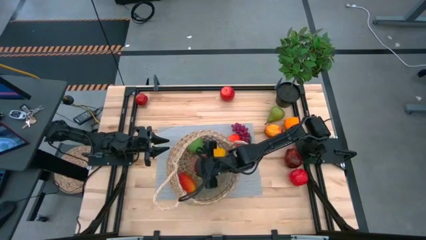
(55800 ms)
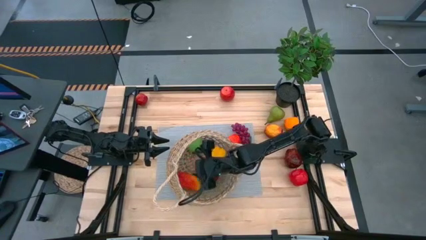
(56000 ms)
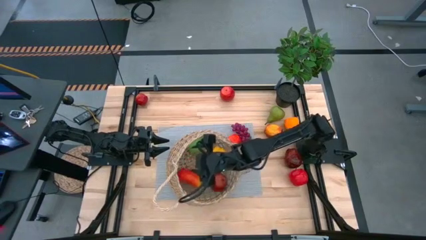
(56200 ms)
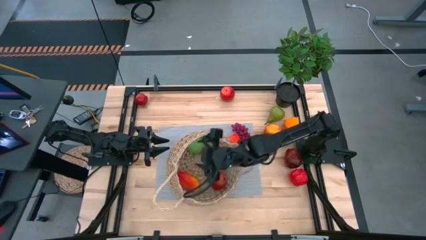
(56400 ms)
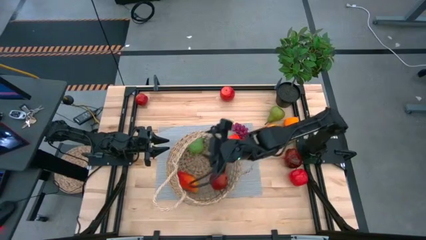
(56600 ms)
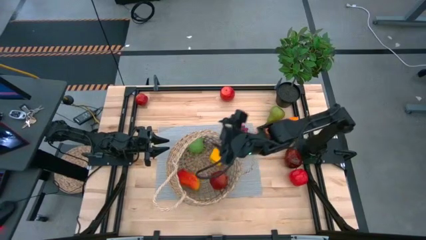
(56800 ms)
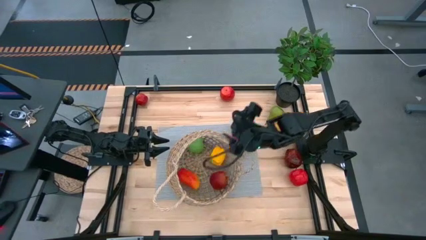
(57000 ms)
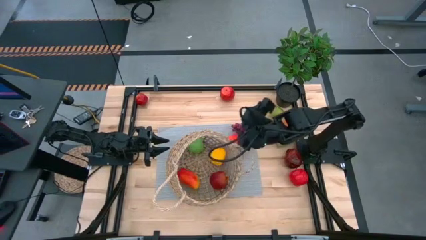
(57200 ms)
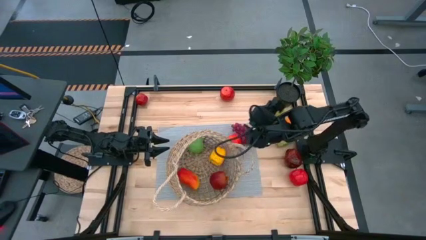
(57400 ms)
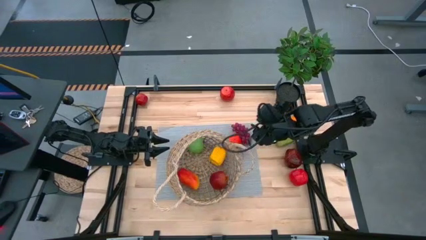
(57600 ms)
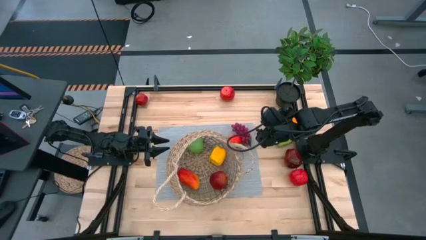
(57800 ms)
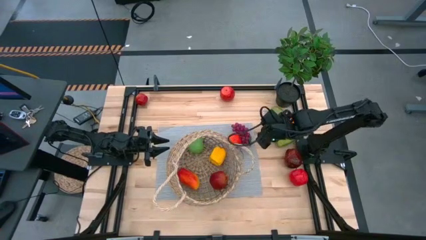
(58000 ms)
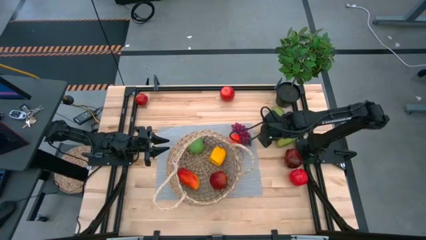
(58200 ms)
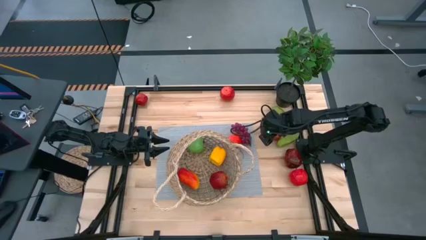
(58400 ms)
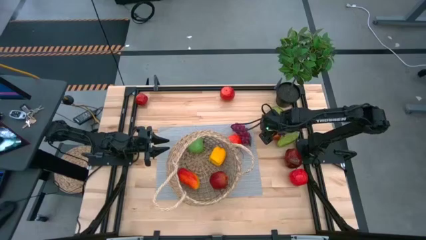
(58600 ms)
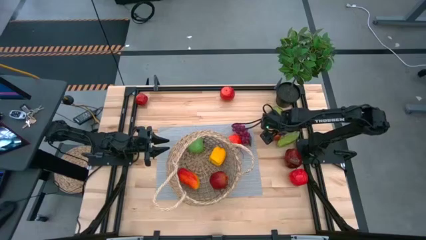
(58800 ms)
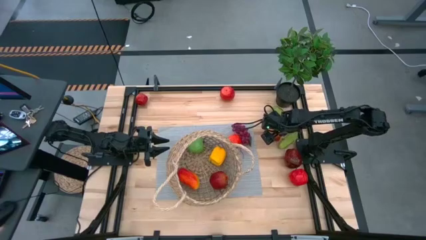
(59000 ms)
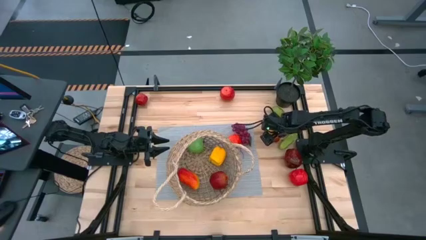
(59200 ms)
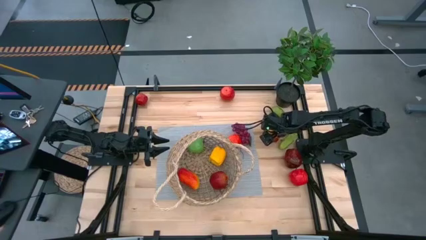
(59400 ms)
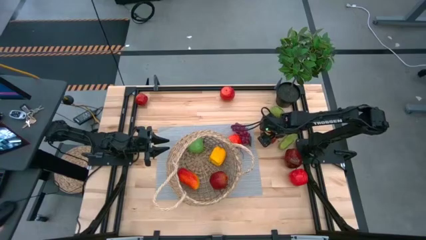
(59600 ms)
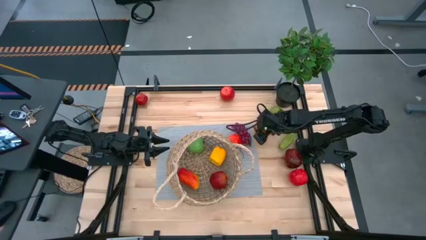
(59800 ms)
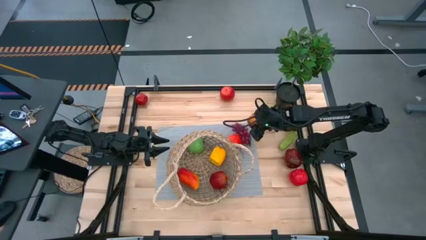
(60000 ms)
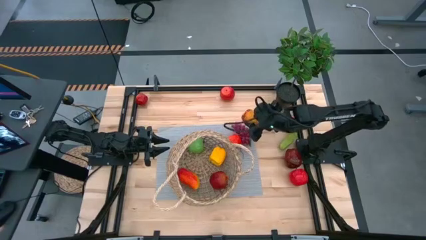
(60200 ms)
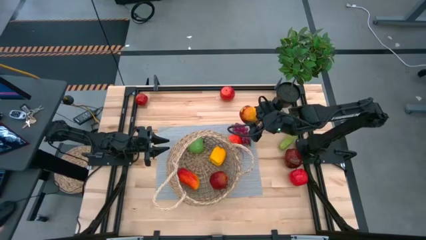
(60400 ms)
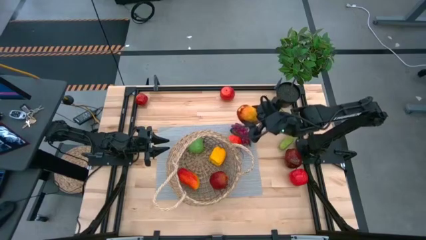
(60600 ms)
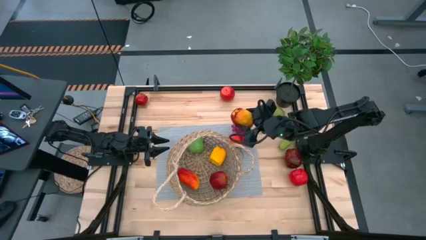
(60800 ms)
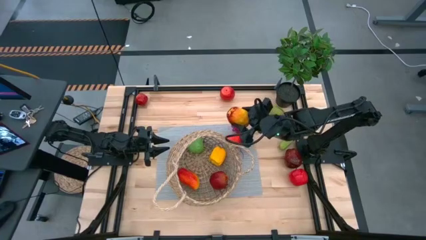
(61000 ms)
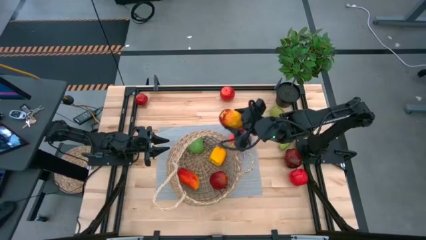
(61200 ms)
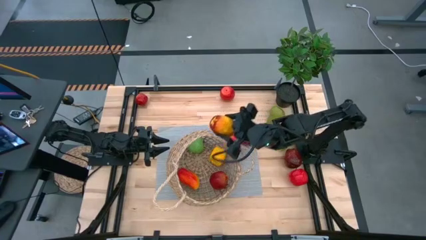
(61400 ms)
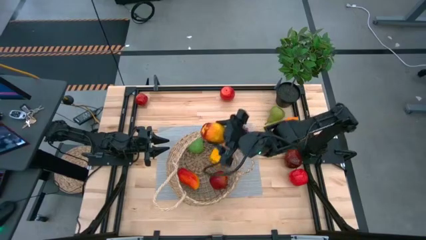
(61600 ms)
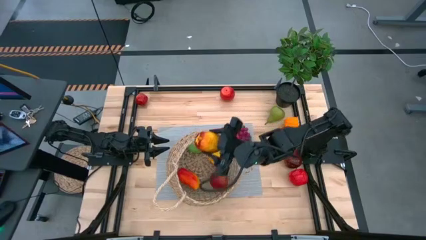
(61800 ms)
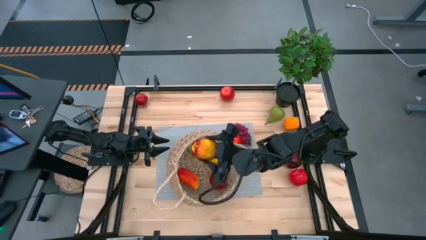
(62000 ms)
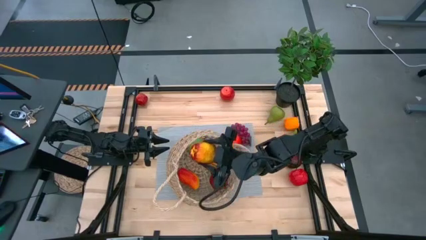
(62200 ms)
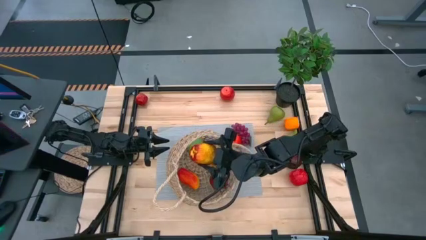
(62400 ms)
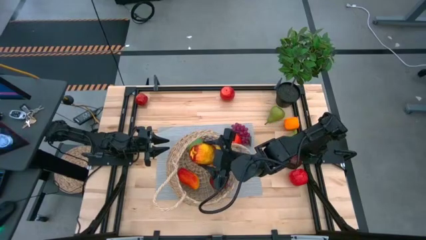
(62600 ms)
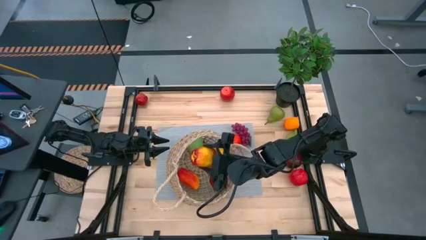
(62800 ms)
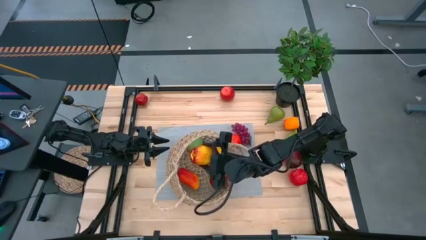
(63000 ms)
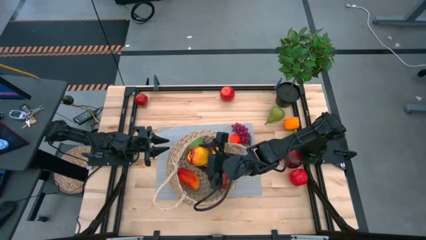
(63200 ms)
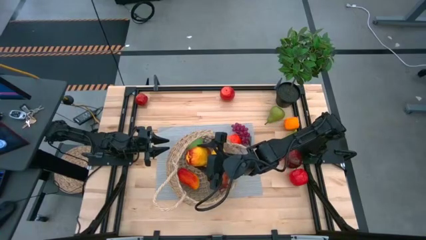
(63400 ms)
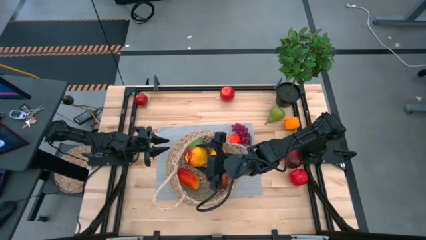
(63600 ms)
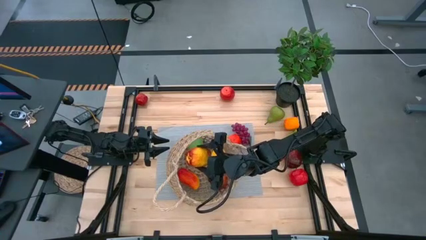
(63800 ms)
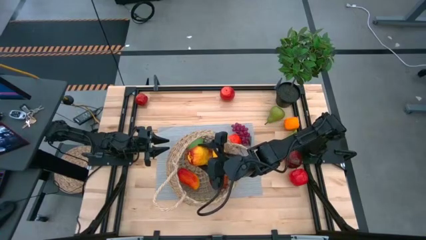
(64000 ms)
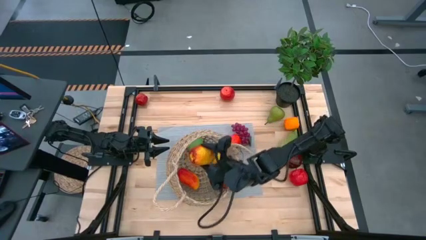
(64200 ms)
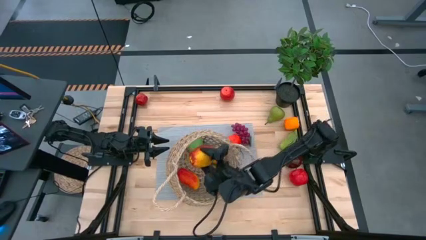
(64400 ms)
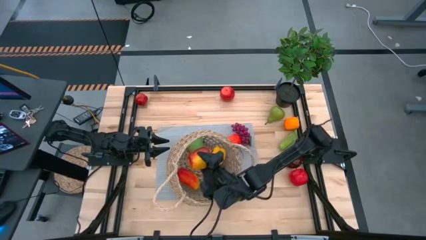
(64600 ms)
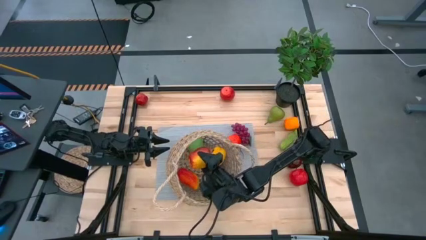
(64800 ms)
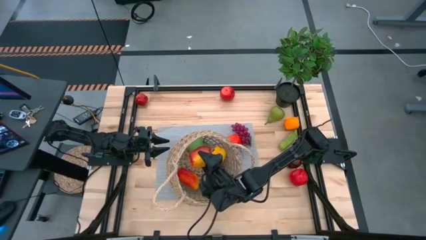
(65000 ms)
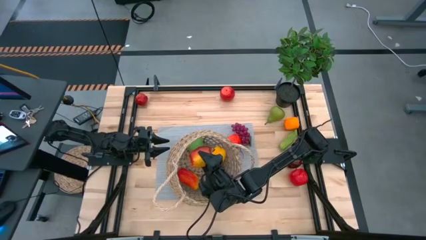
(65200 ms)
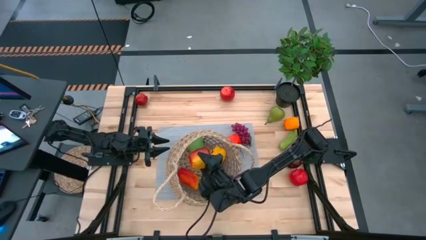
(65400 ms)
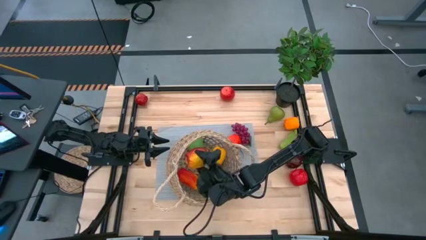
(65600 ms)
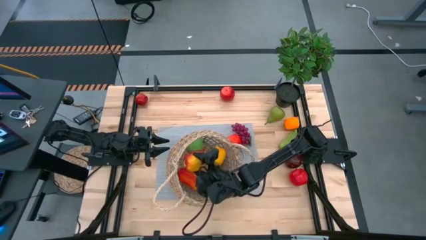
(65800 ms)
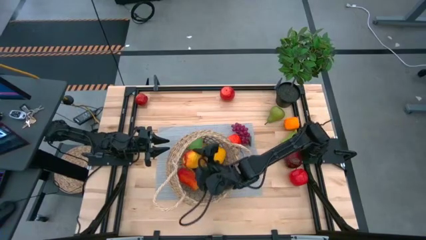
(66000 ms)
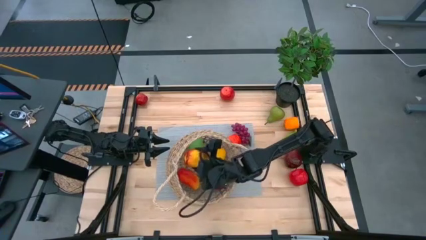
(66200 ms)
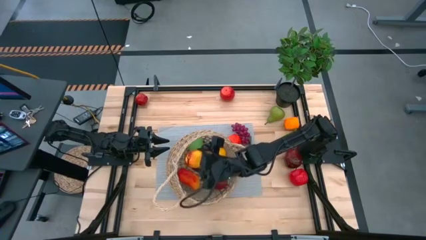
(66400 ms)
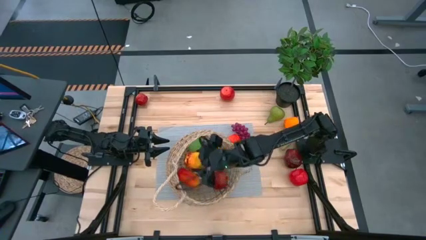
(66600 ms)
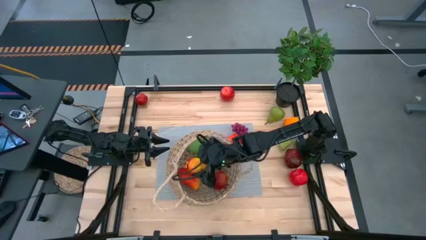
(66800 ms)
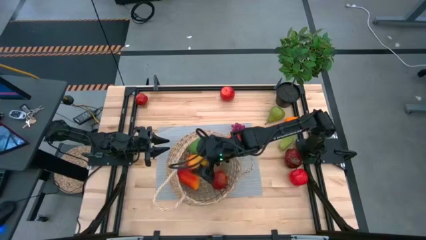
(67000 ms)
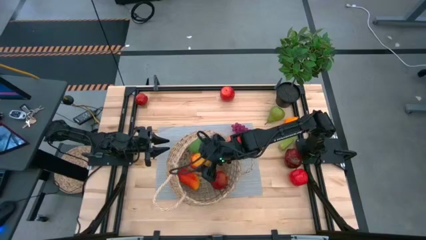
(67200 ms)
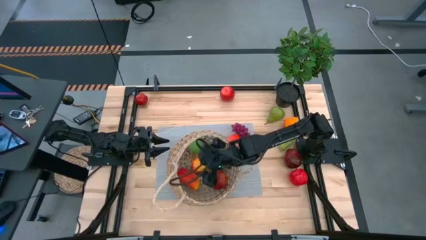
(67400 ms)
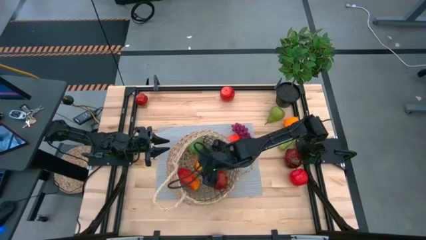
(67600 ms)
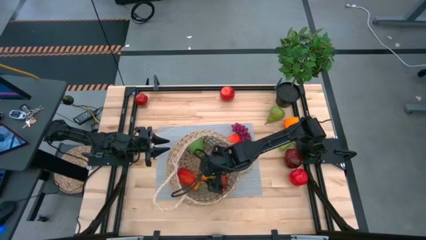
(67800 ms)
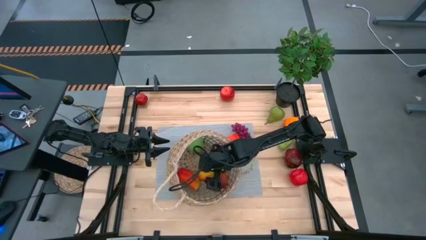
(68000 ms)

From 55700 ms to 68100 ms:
Task: Build produce basket
Put the red apple into the brown basket

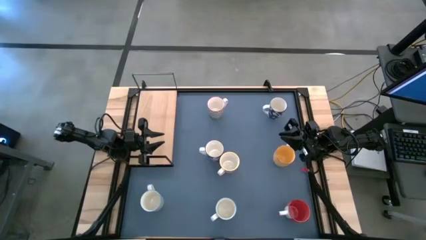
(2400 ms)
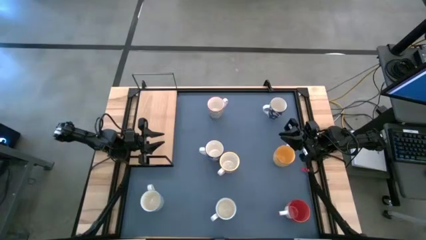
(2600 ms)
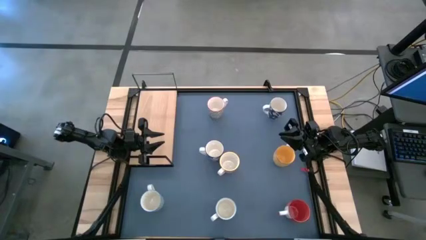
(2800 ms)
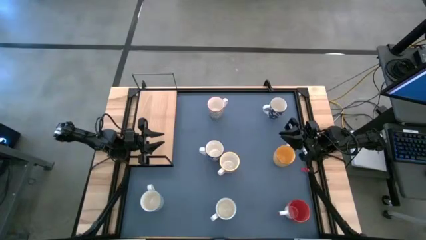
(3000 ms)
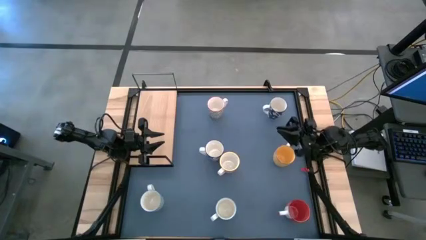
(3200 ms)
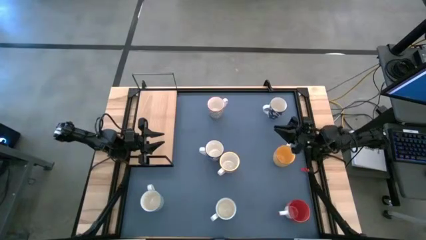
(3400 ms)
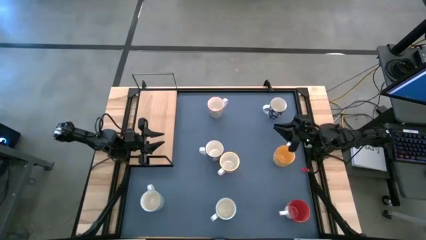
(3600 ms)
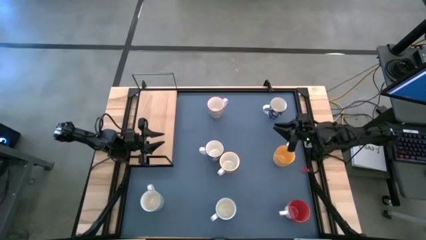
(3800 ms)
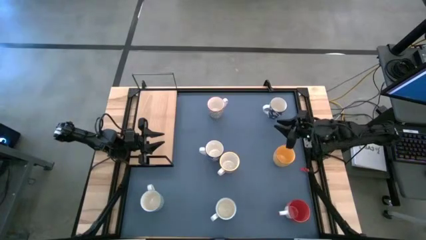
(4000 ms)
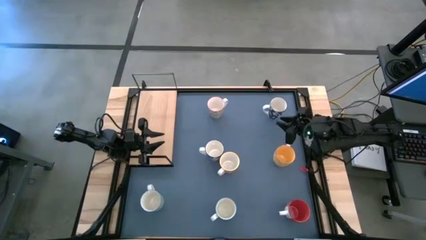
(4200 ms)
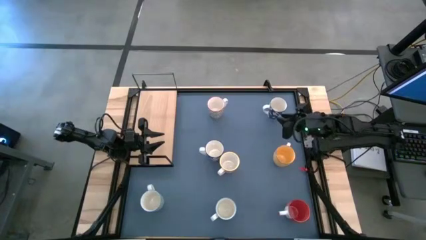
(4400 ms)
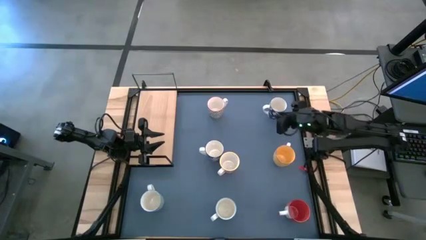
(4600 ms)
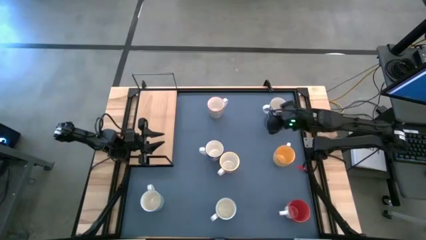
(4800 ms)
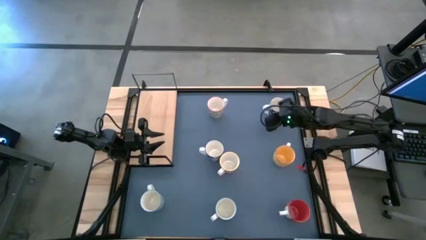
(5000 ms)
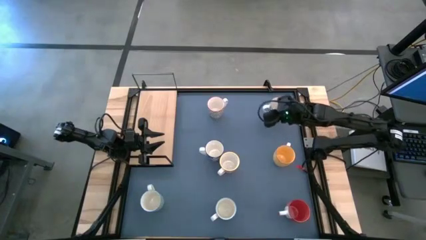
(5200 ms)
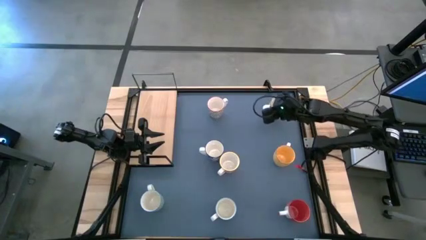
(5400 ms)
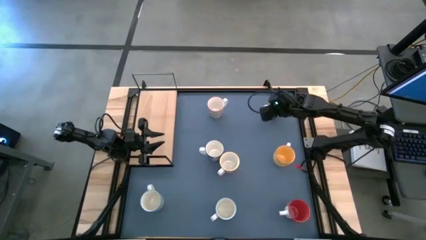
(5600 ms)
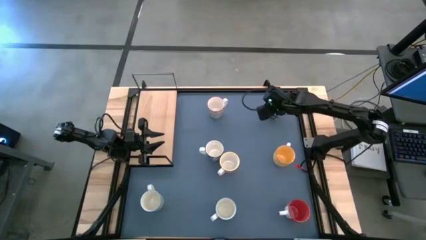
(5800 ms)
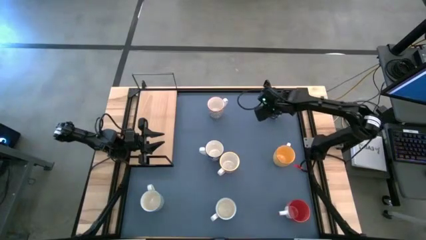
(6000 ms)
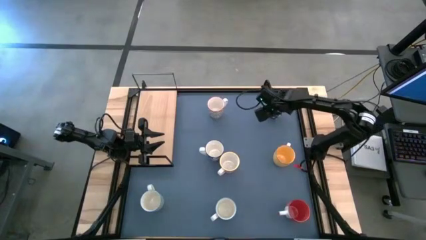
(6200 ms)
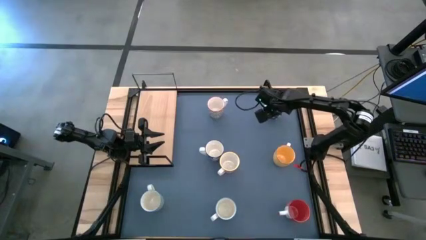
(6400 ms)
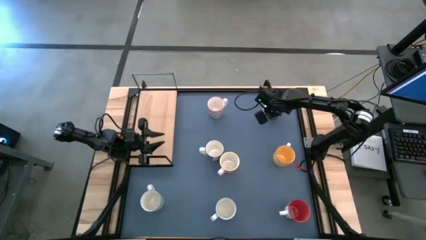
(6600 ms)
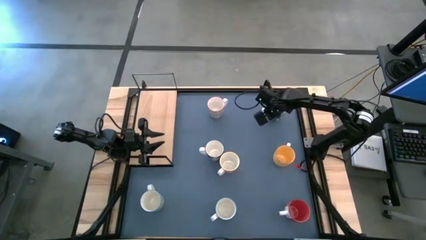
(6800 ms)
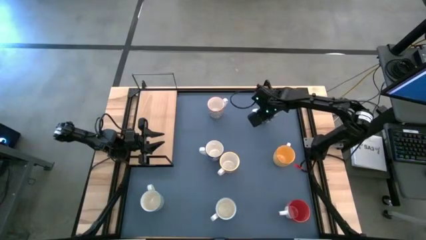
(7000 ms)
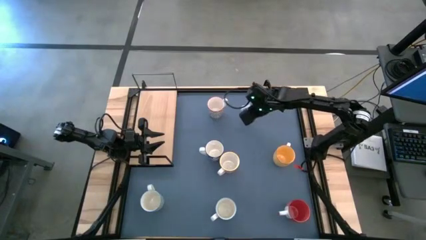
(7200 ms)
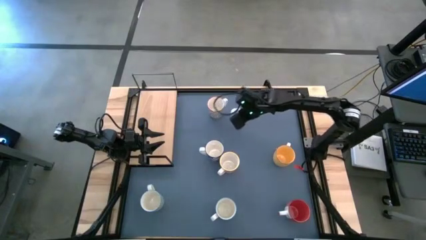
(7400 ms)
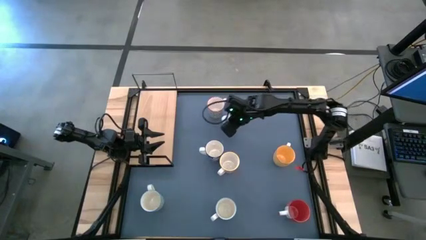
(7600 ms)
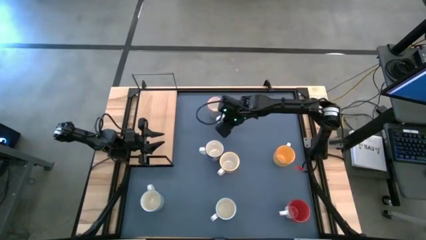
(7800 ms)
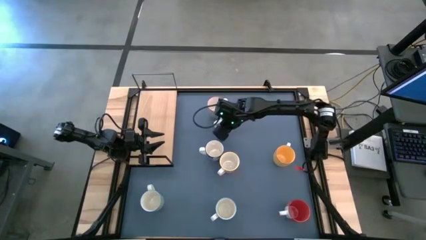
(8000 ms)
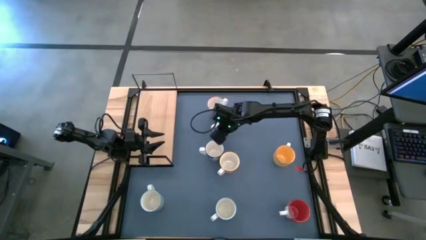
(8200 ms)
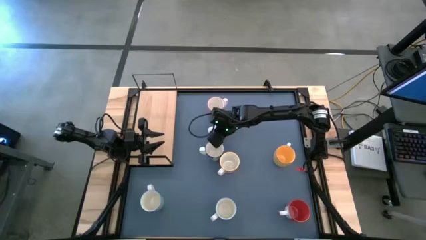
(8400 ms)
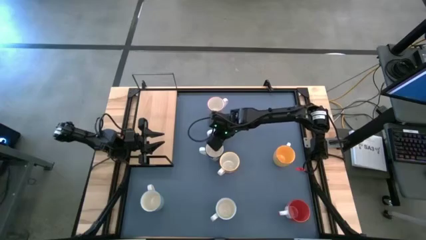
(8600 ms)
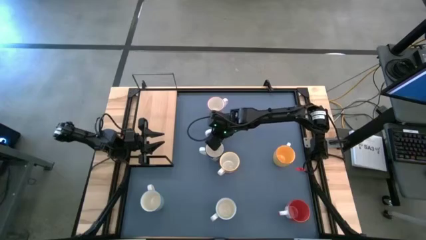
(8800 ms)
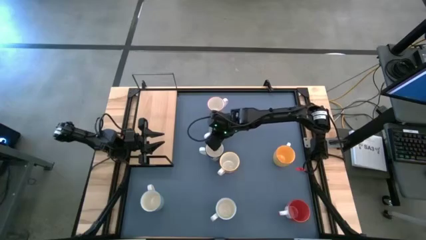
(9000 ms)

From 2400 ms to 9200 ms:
Task: Place coffee mugs
Move the blue patterned mug beside the other blue patterned mug
